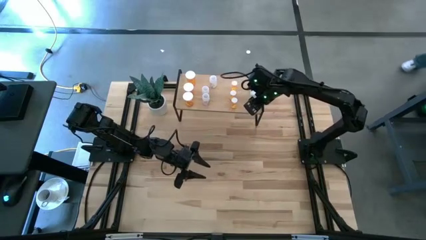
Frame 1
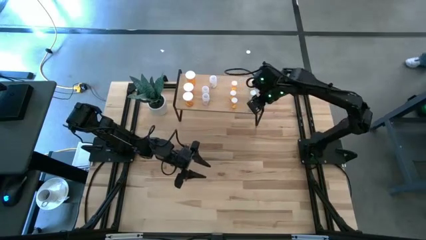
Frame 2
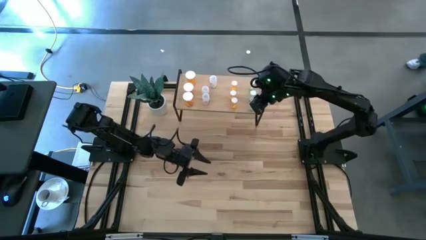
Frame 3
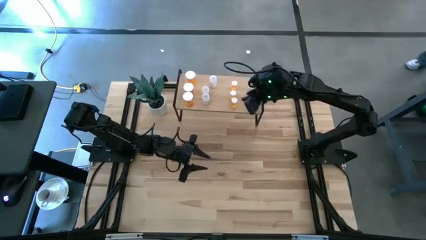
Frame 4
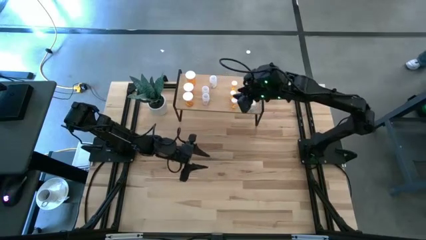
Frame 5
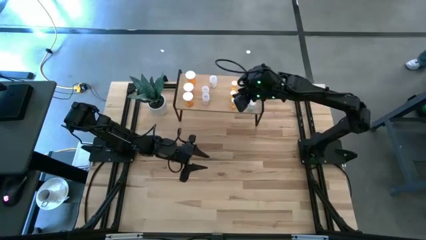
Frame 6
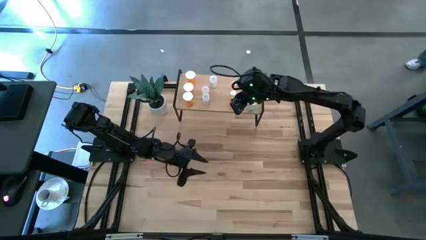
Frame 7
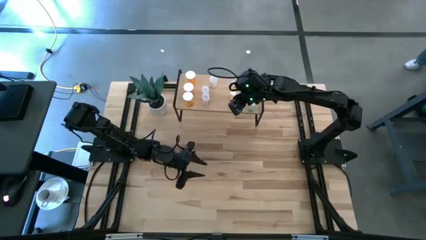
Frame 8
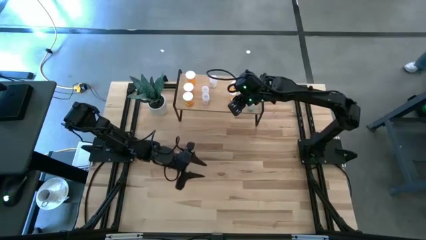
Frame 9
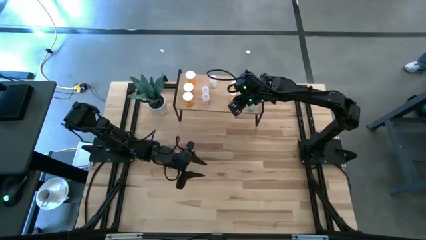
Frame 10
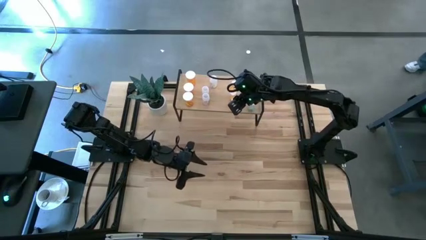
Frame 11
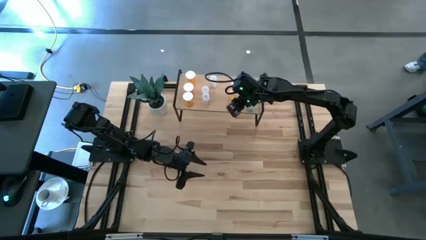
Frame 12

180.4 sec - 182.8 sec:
Task: Pick and place medicine bottles onto shelf by color
Adjust the orange pill bottle on the shelf

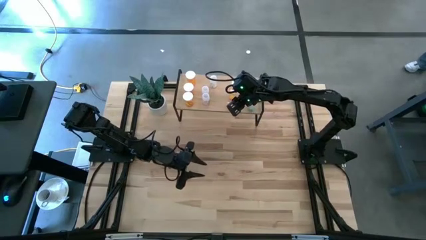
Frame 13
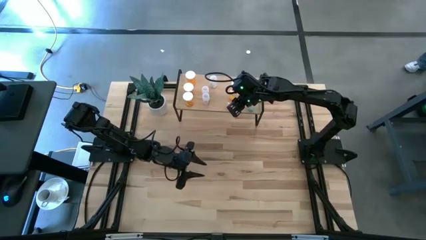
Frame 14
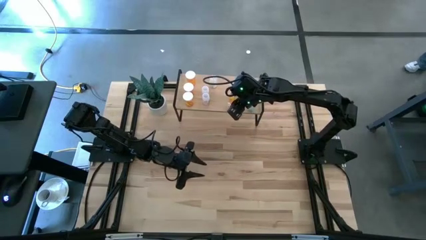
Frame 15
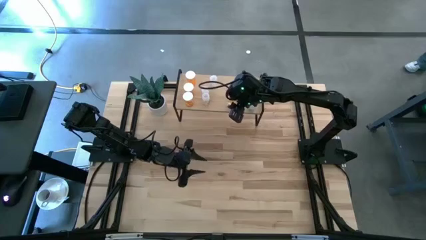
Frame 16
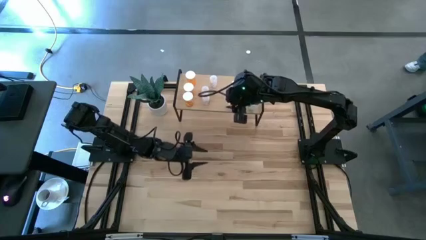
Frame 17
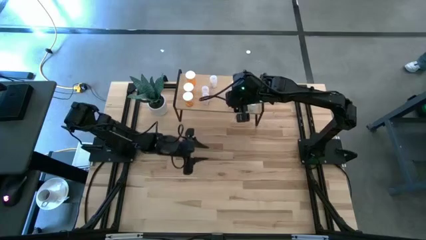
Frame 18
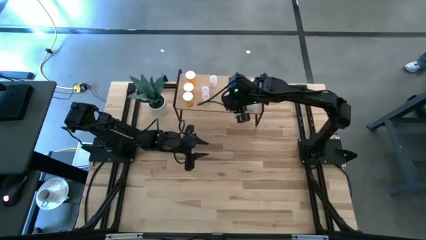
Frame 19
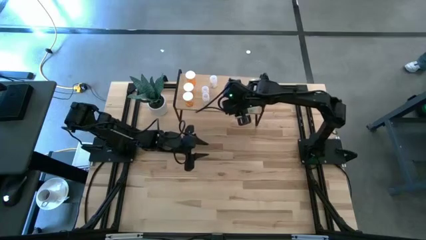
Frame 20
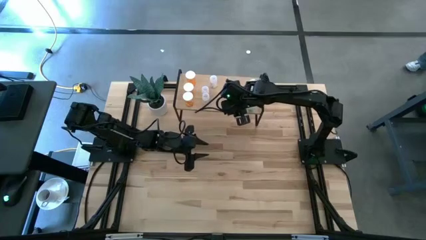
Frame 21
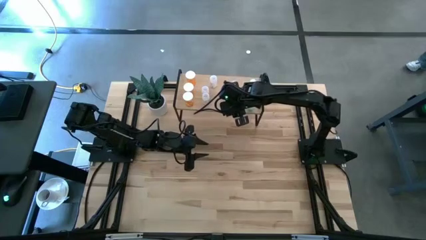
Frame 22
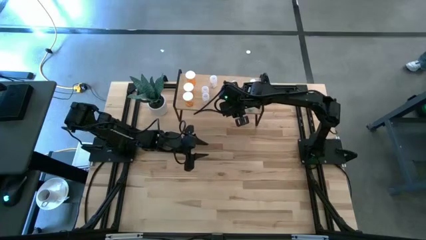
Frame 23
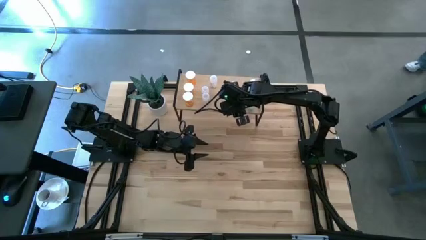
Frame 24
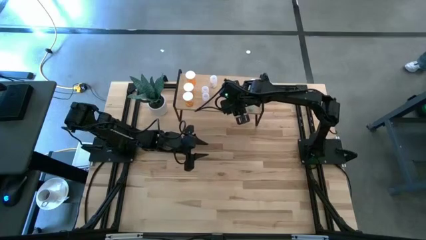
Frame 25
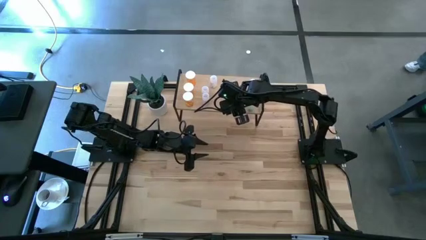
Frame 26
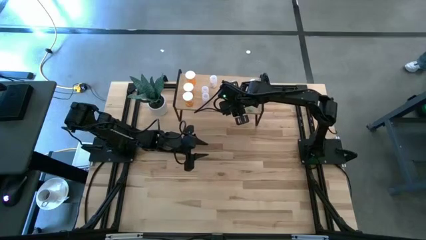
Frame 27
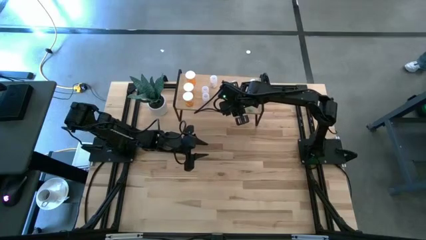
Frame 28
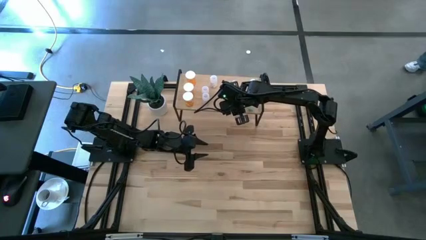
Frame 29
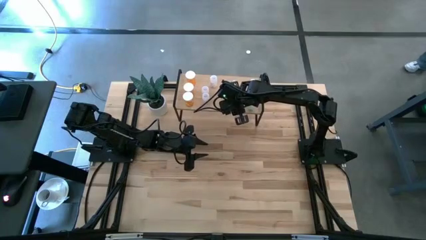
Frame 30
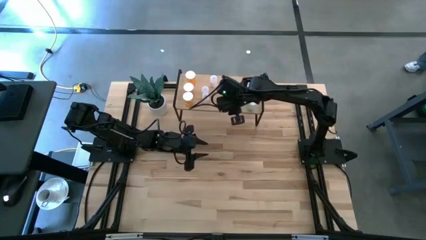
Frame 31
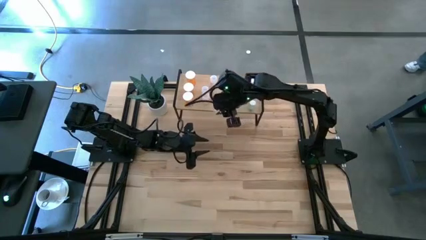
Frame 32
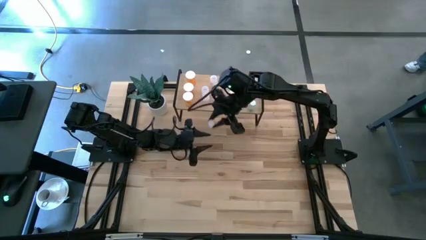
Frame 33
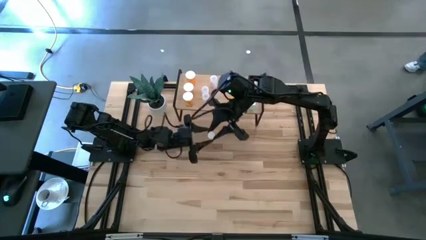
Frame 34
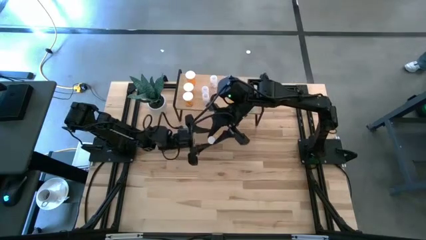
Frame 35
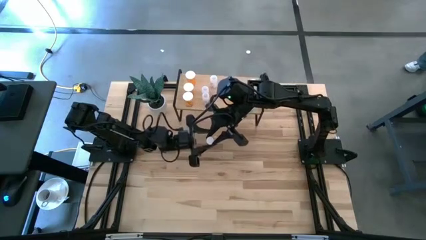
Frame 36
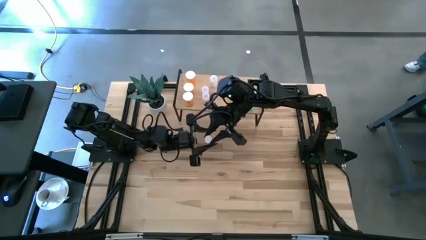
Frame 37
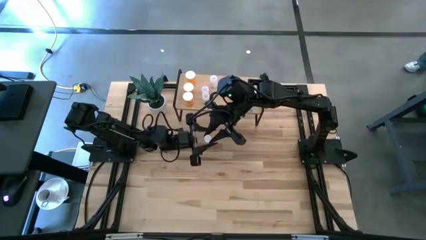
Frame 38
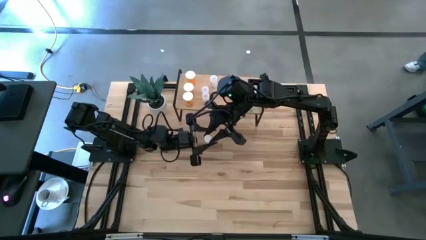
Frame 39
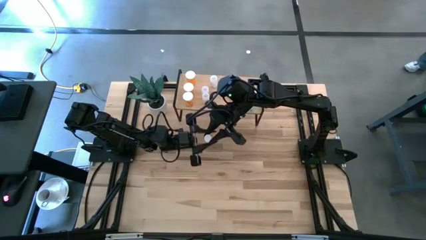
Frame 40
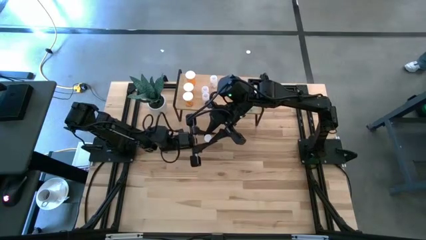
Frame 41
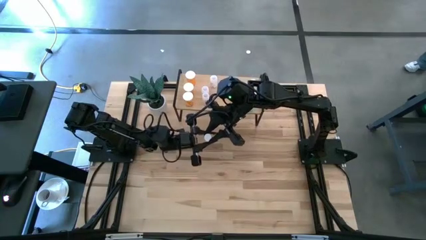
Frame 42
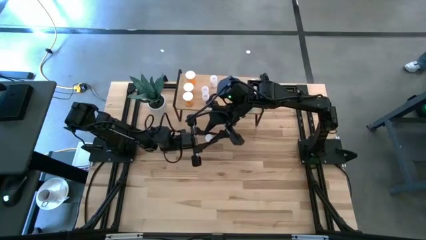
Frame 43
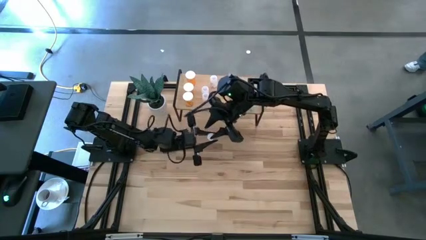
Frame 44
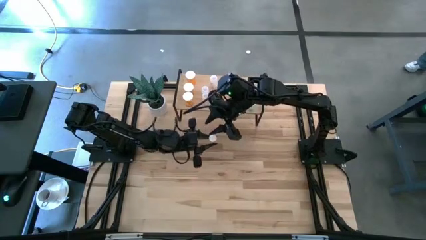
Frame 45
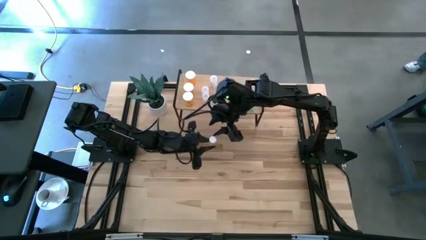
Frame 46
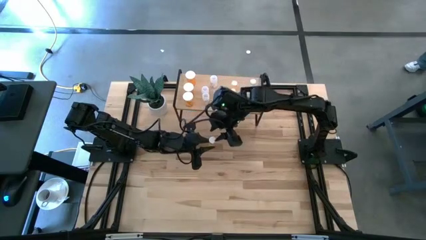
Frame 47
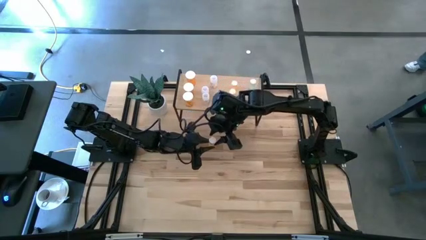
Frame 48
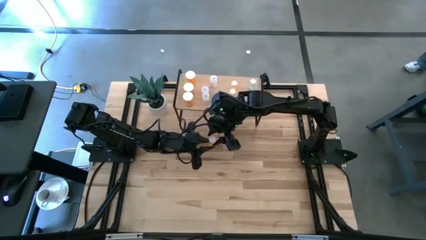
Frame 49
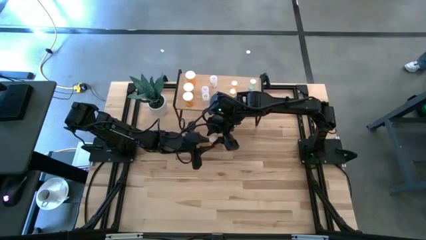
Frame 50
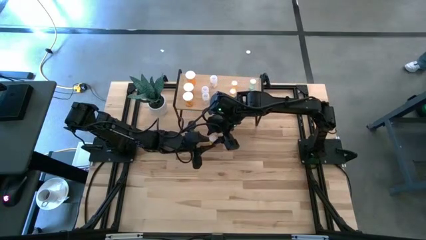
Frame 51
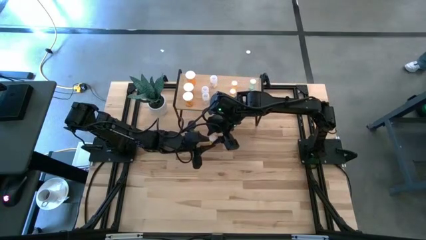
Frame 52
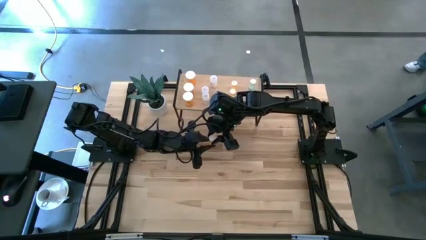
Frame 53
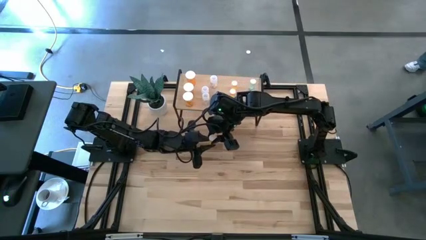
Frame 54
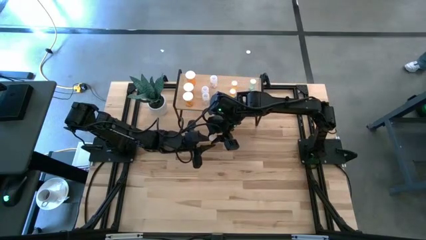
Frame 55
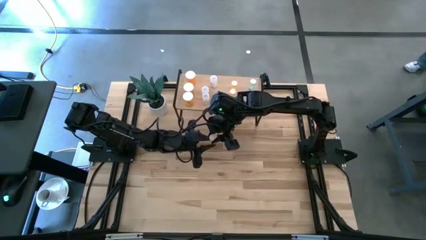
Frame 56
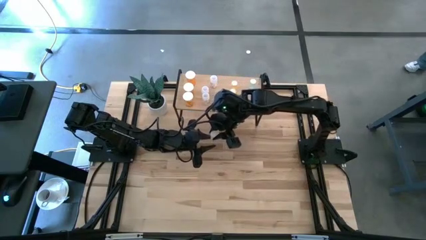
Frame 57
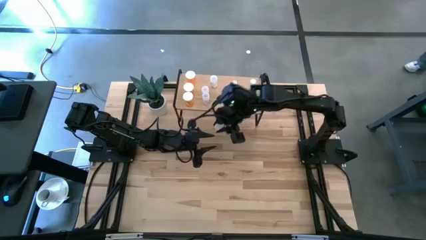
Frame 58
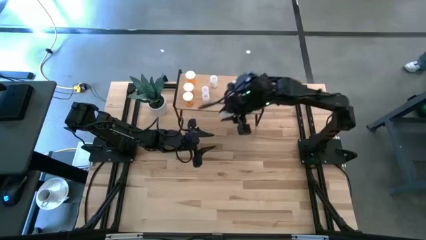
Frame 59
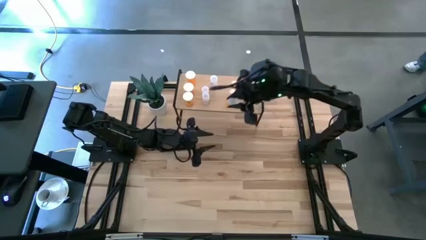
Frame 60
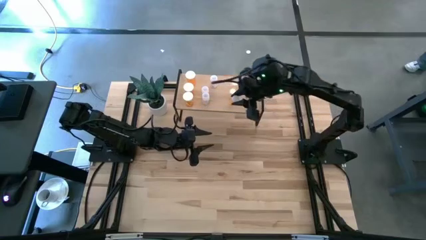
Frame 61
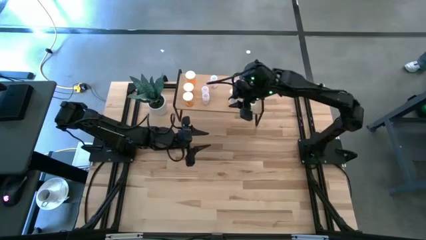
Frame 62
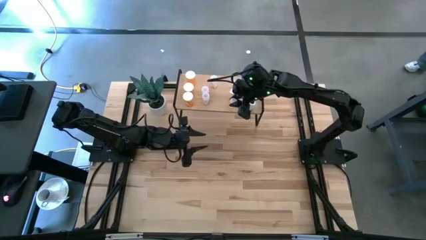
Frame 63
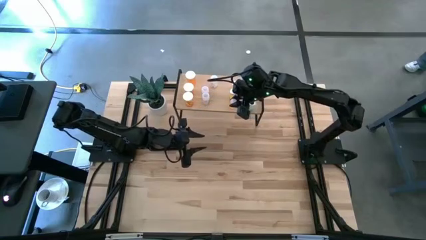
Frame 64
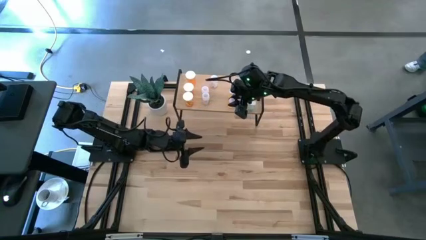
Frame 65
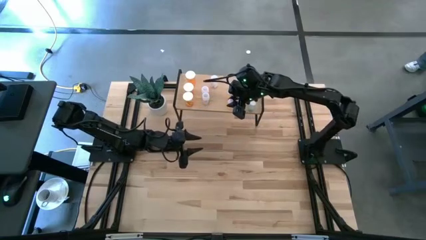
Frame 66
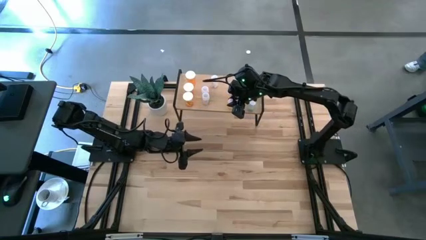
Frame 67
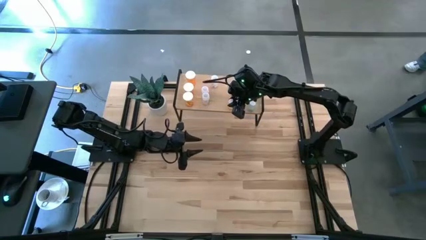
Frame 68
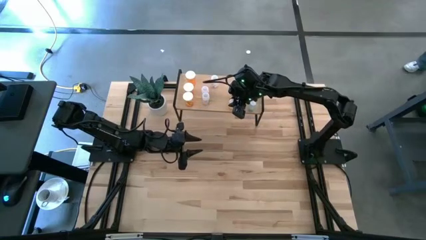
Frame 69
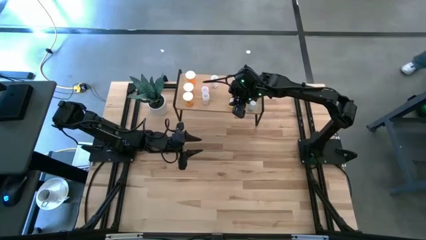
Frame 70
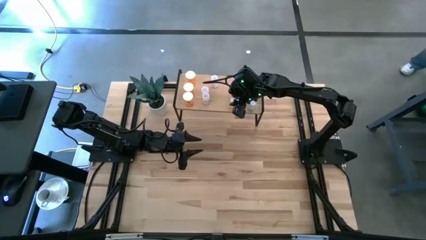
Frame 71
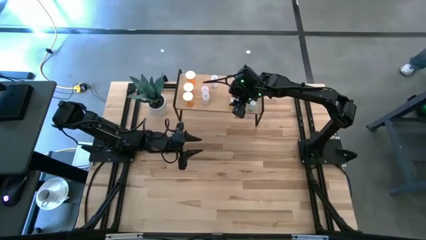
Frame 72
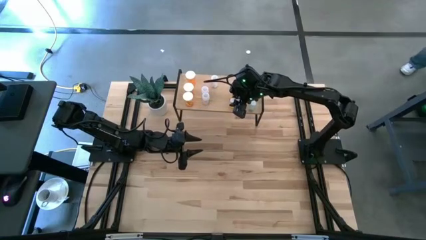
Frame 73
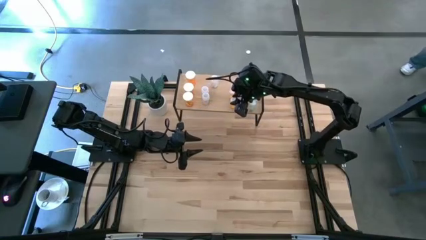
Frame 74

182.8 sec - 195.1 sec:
Adjust the orange pill bottle on the shelf
